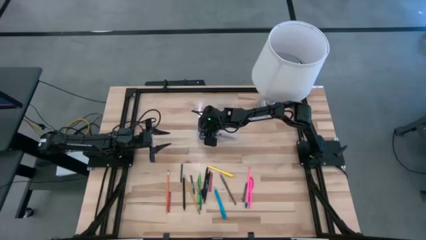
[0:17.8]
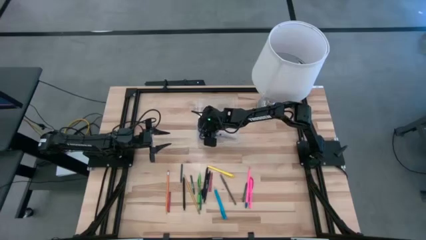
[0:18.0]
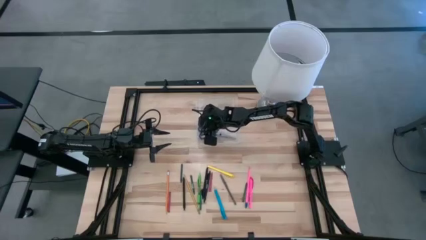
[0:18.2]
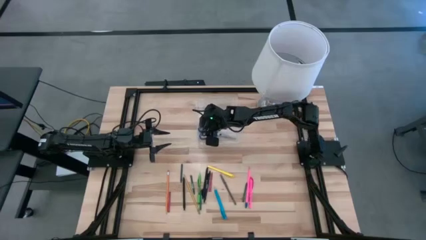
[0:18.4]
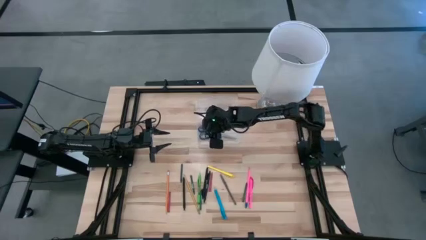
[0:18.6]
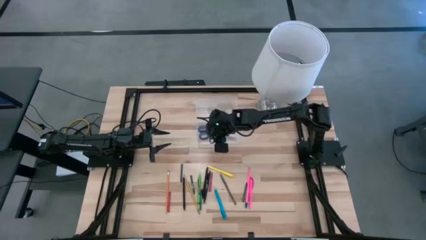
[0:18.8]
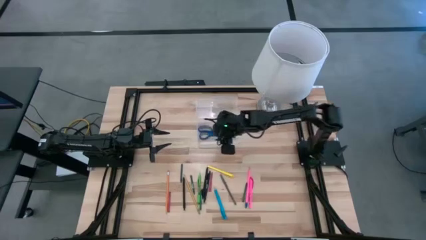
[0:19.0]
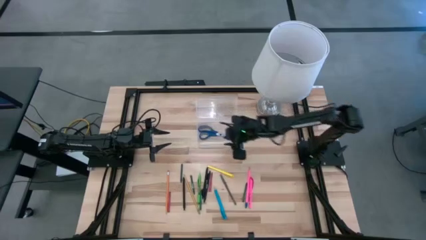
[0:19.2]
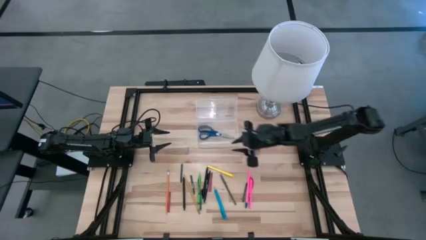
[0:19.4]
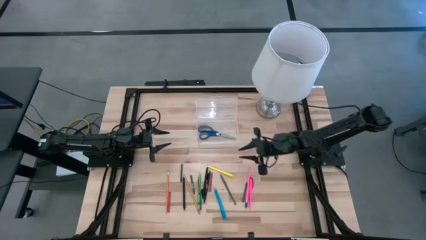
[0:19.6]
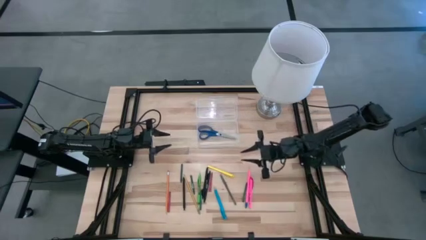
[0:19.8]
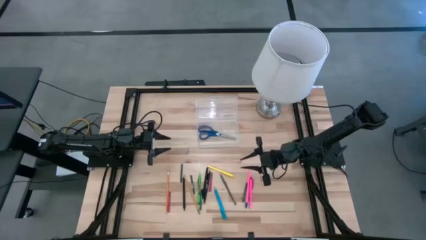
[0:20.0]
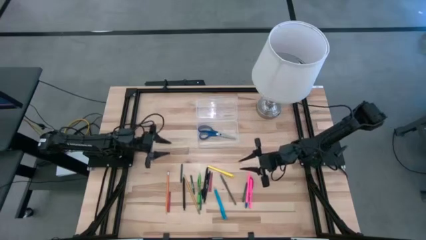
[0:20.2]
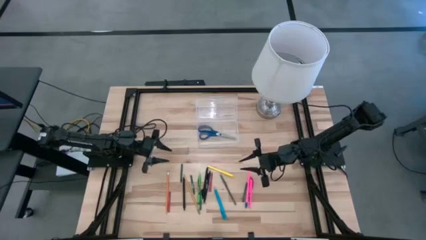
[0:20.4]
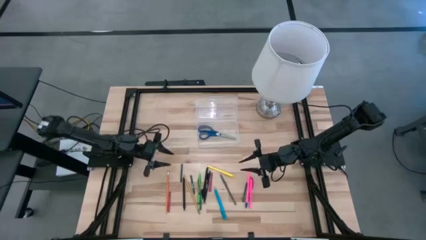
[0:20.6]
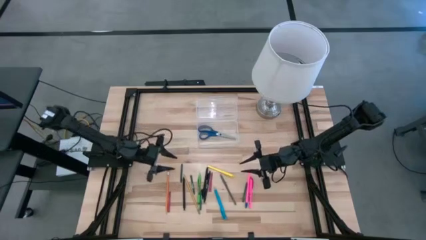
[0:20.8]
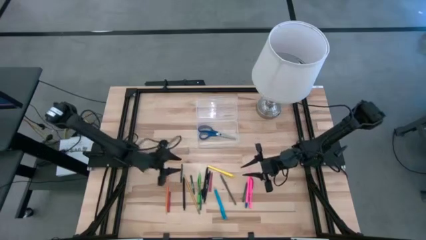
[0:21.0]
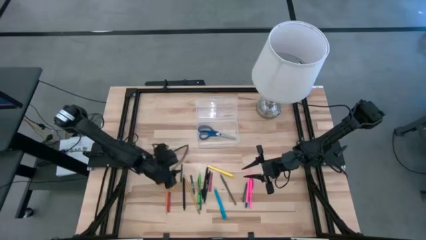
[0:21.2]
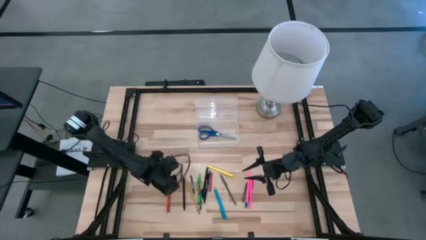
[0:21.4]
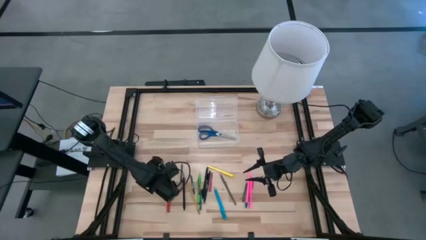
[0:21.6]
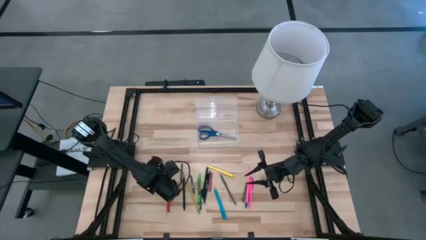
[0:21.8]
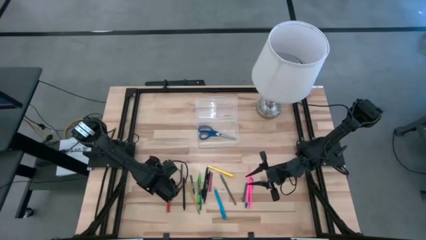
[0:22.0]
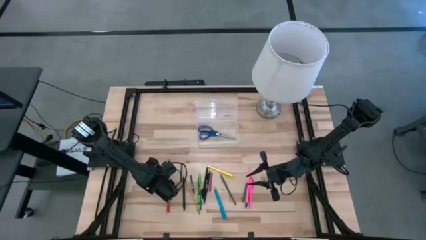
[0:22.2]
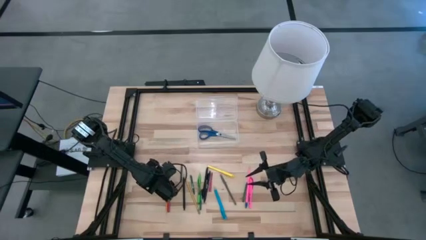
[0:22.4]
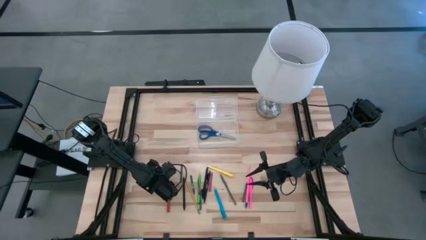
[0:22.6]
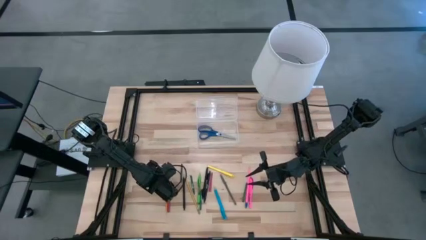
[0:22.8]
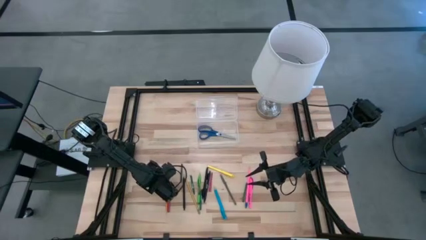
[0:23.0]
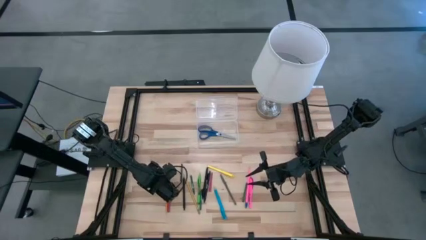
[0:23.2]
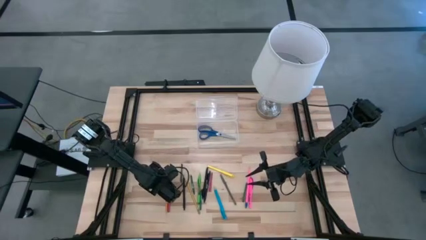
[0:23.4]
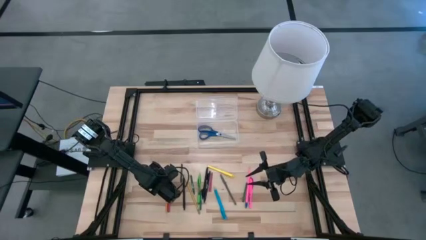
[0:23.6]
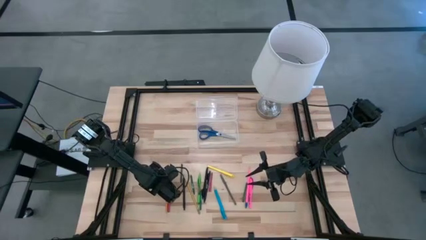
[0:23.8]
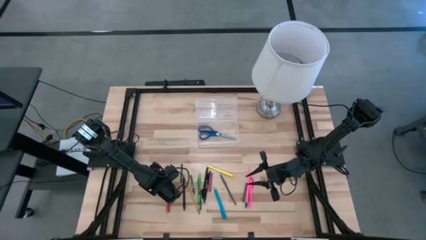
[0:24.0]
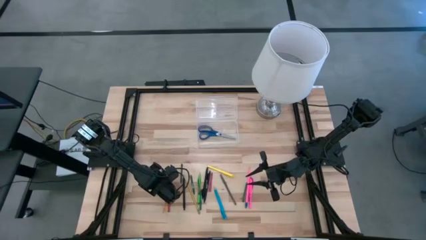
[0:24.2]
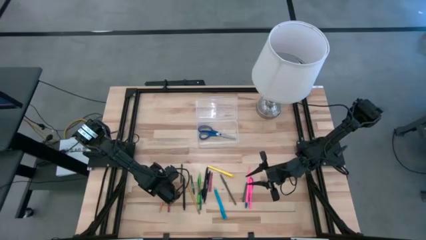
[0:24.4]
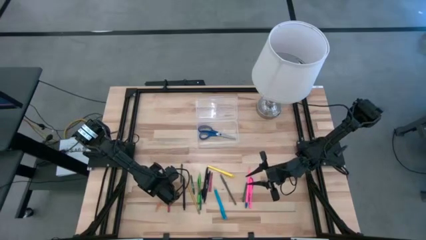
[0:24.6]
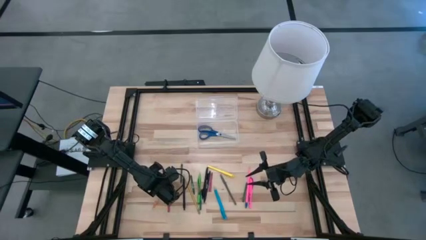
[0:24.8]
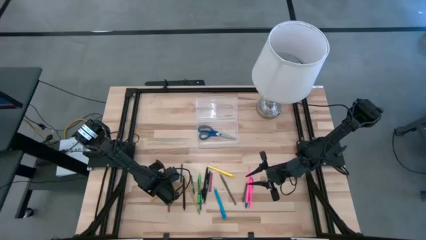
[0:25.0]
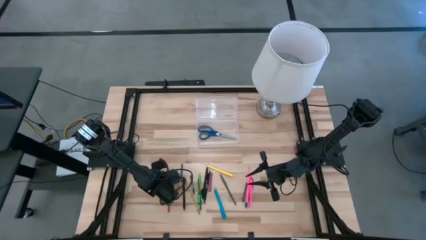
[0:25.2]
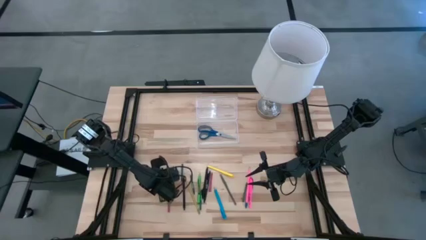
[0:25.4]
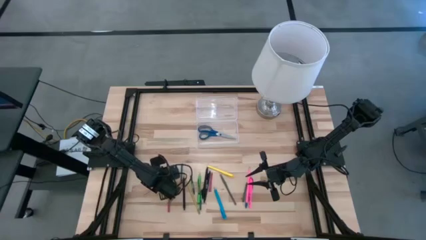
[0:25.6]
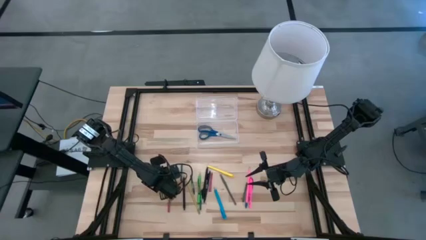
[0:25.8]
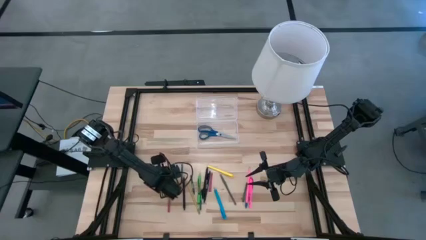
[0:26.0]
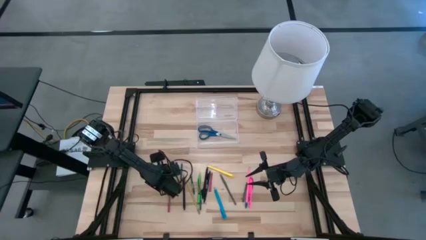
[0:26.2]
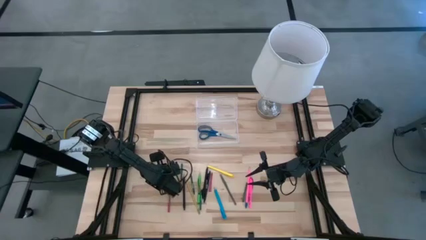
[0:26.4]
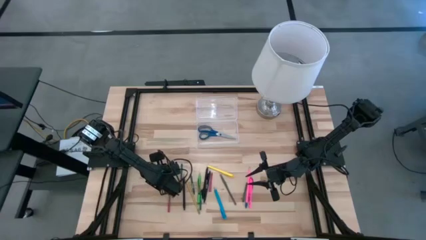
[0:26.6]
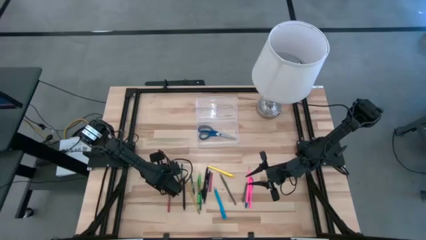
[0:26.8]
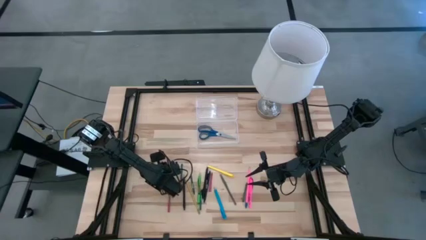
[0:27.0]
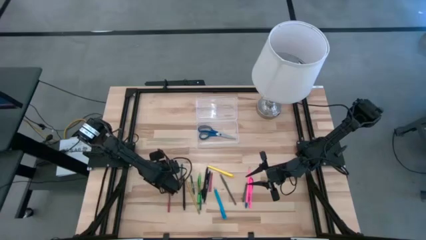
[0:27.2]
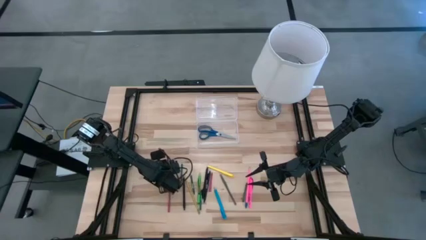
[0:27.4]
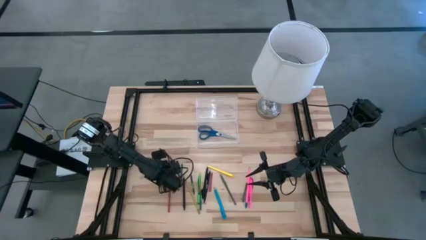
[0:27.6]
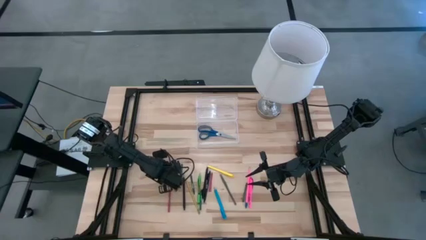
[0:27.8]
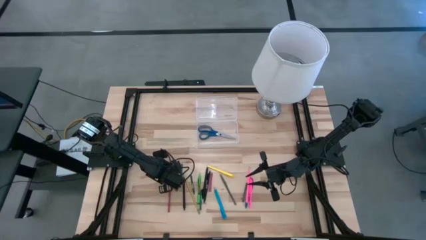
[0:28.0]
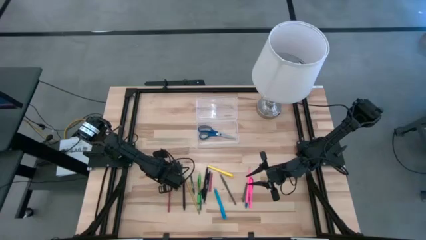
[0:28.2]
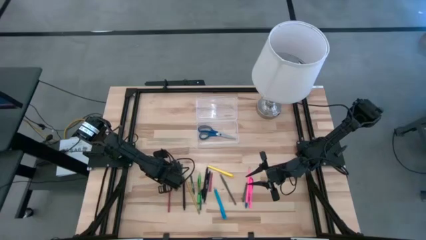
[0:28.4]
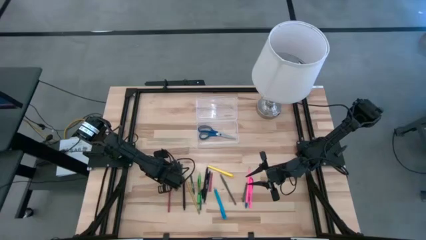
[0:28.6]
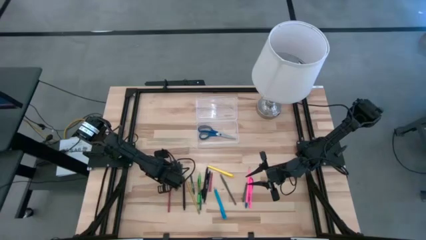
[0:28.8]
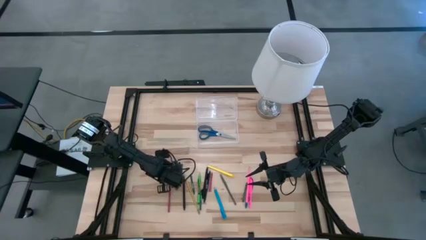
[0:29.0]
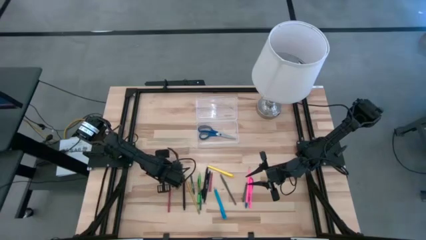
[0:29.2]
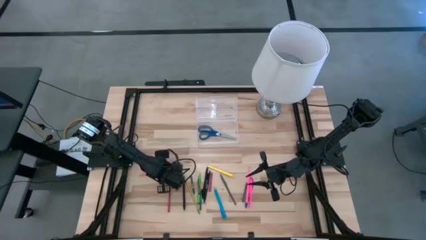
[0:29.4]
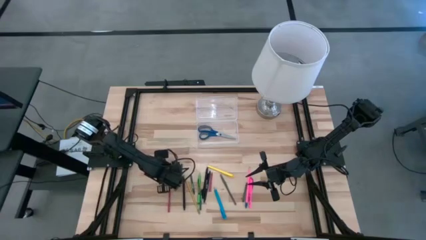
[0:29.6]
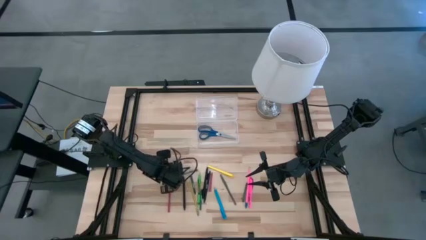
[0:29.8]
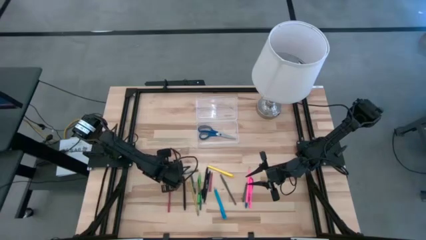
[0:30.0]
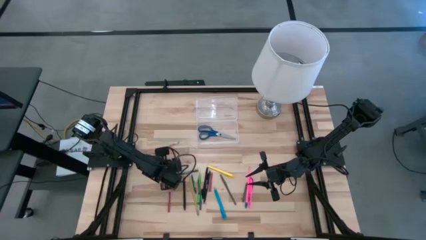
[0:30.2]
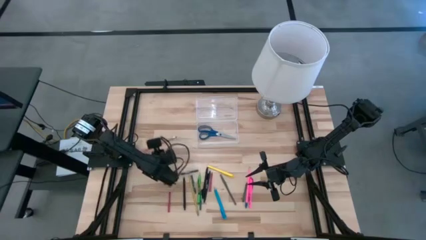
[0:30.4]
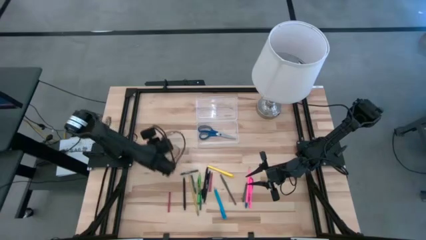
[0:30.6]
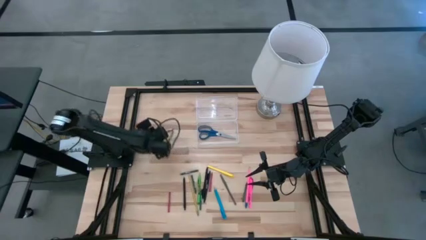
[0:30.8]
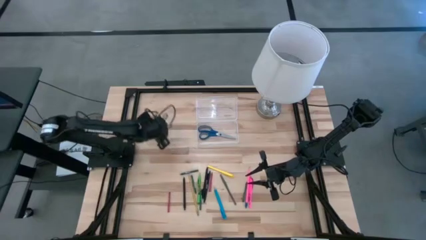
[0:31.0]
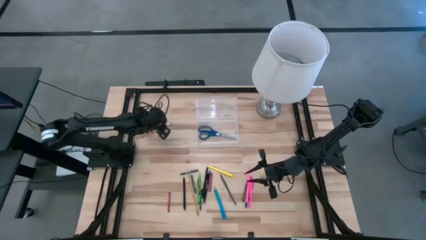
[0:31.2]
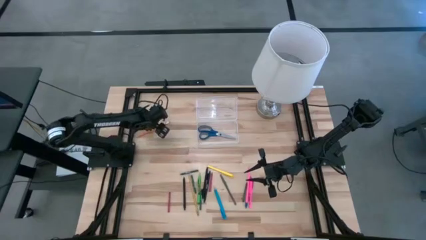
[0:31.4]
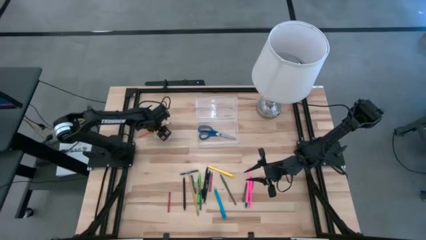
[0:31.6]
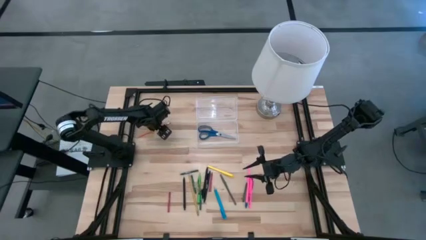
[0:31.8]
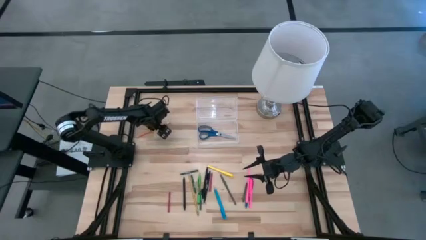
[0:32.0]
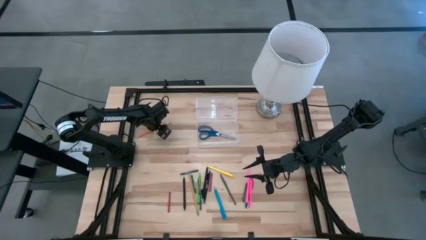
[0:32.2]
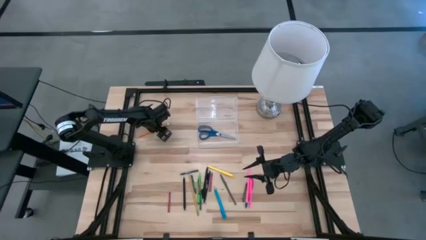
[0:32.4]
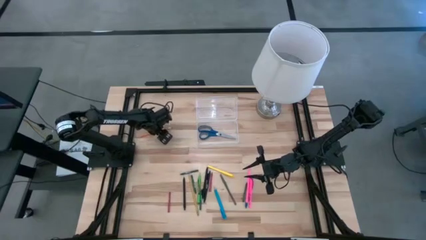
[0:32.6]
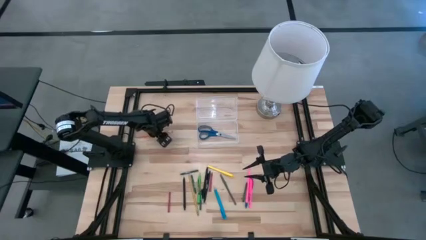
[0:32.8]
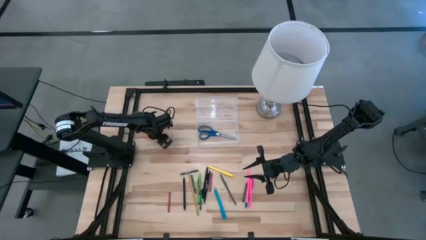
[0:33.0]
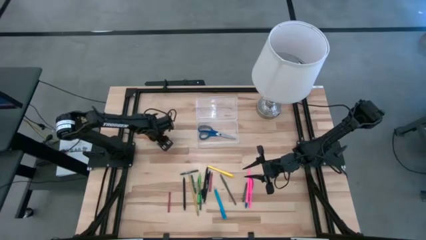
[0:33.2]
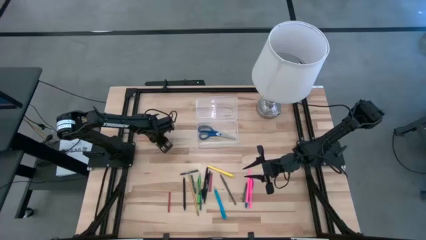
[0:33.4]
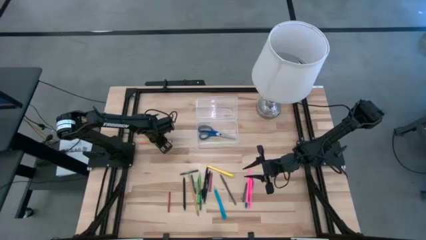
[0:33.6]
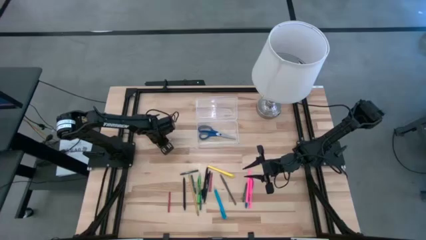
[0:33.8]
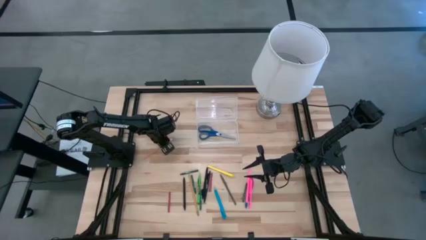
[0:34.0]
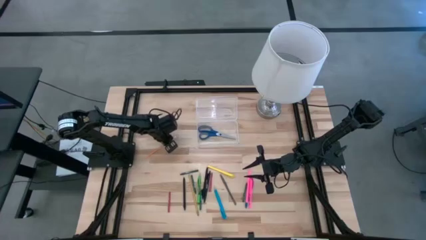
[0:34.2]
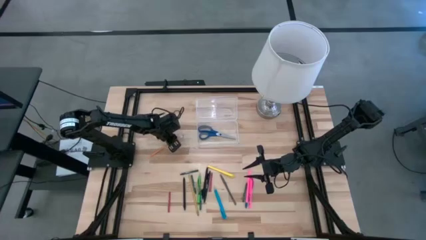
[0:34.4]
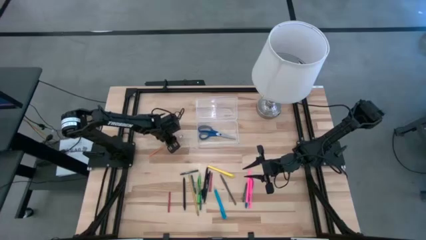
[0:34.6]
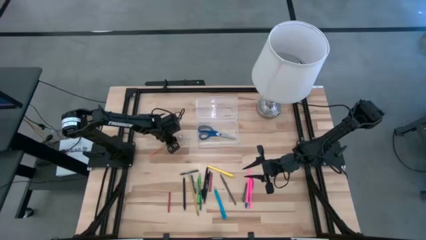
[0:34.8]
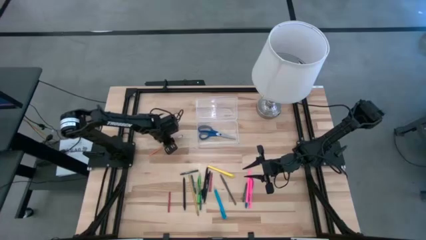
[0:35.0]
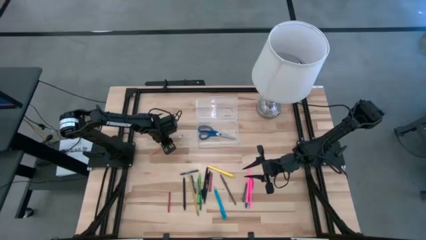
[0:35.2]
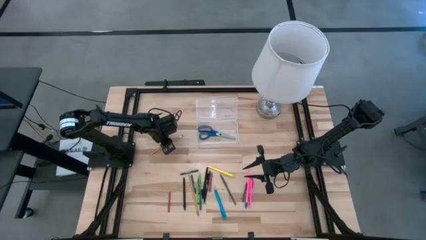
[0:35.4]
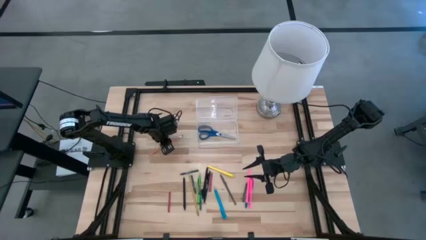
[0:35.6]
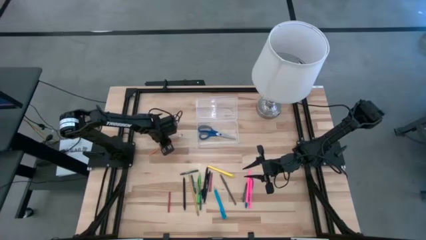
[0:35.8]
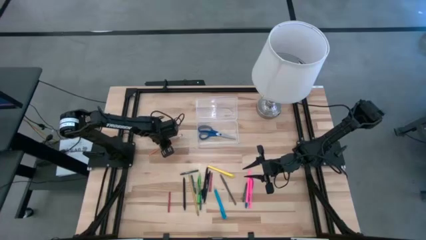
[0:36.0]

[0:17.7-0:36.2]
Task: Pick & place school supplies into a supply box
Put the orange pencil into the supply box
